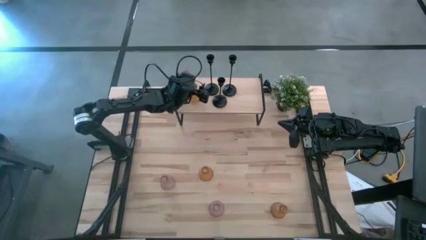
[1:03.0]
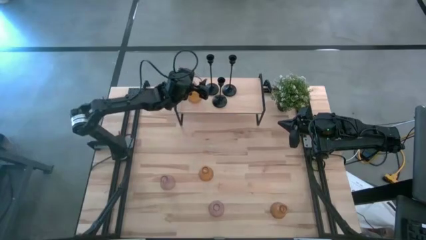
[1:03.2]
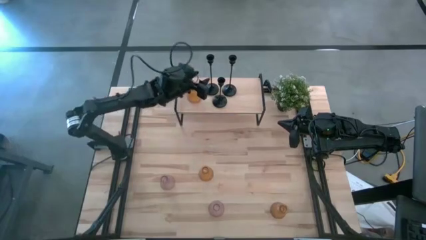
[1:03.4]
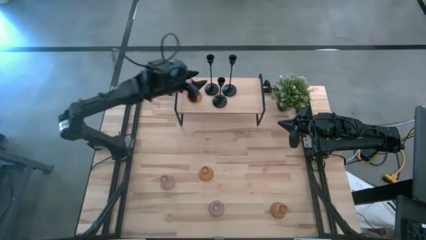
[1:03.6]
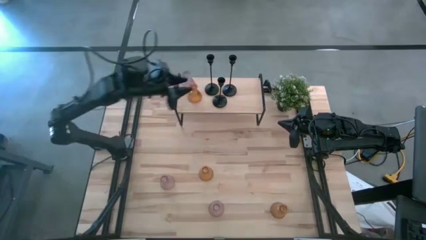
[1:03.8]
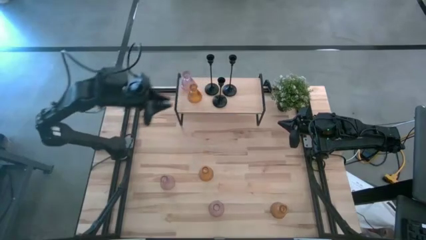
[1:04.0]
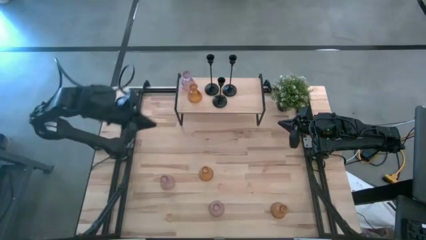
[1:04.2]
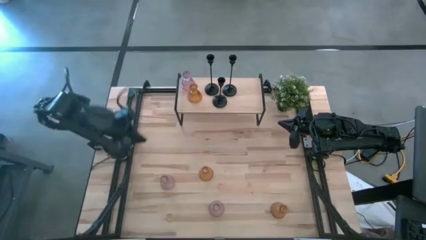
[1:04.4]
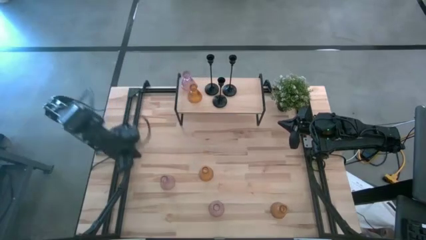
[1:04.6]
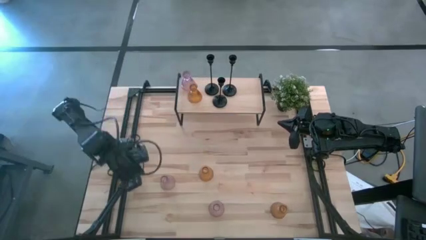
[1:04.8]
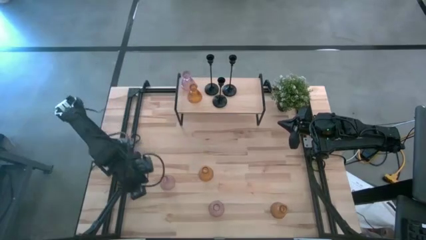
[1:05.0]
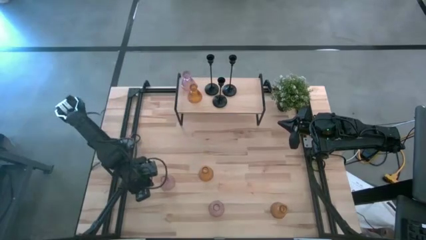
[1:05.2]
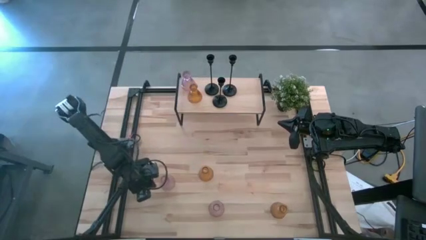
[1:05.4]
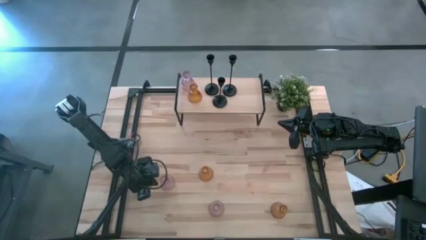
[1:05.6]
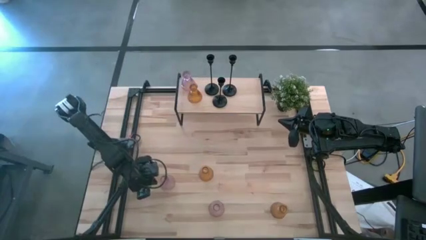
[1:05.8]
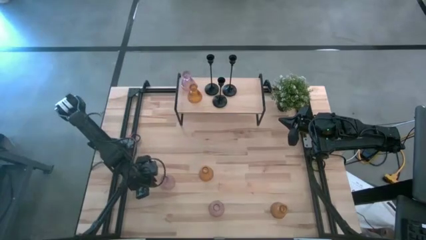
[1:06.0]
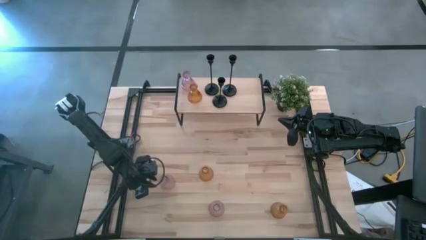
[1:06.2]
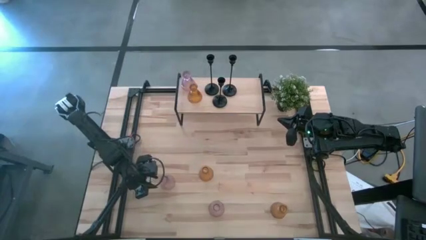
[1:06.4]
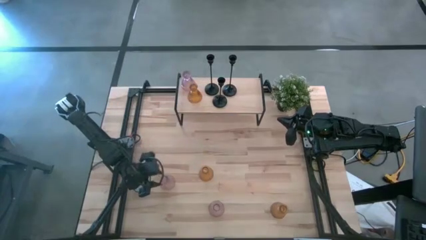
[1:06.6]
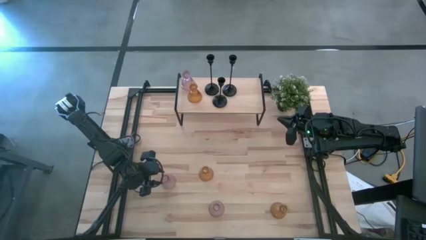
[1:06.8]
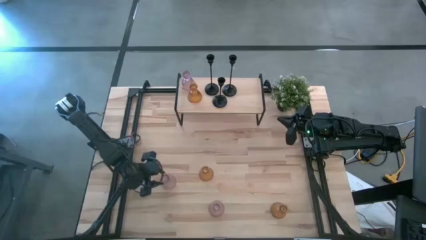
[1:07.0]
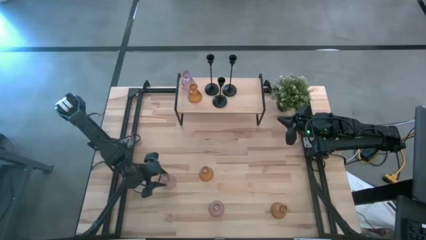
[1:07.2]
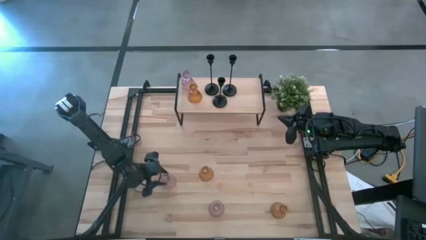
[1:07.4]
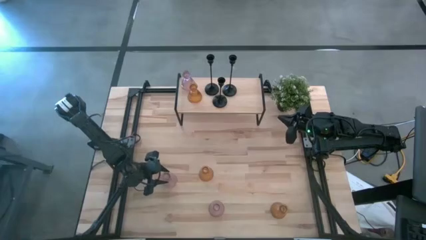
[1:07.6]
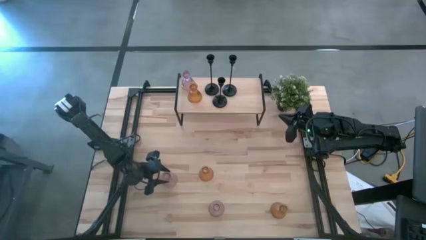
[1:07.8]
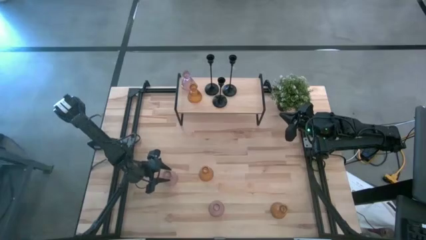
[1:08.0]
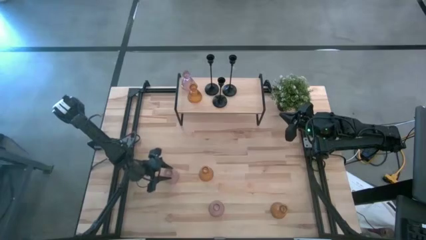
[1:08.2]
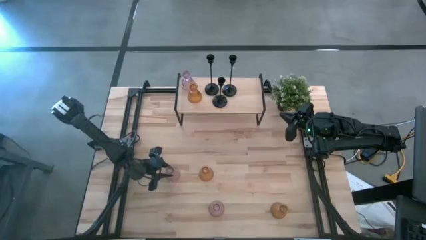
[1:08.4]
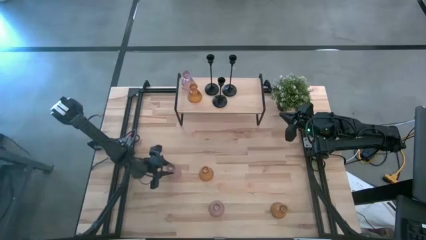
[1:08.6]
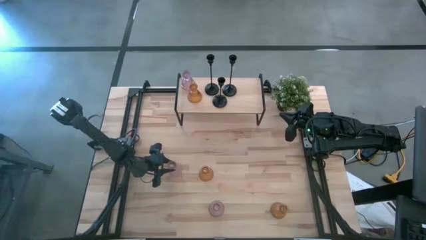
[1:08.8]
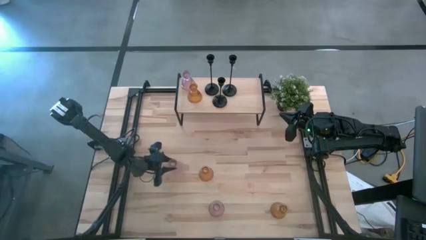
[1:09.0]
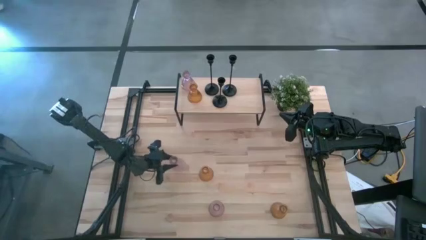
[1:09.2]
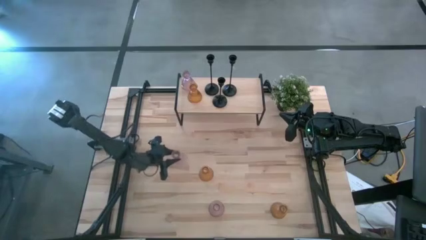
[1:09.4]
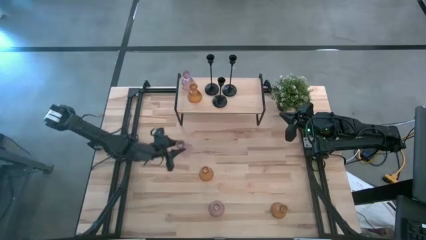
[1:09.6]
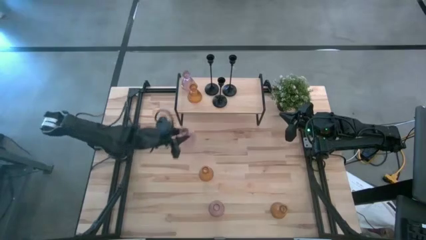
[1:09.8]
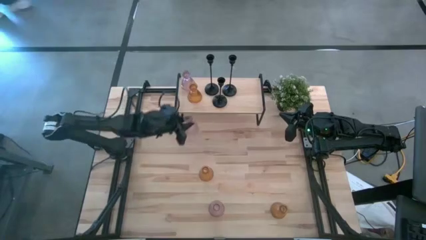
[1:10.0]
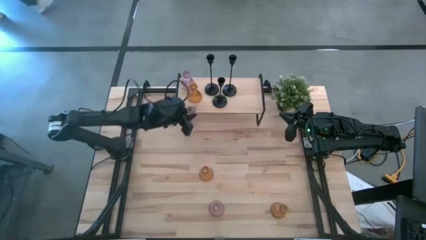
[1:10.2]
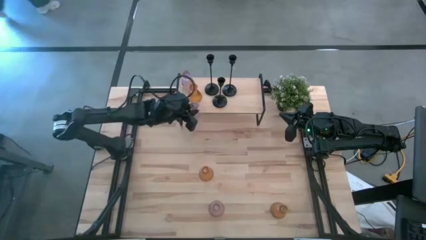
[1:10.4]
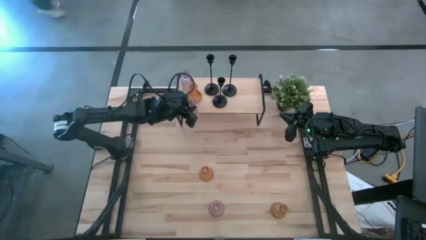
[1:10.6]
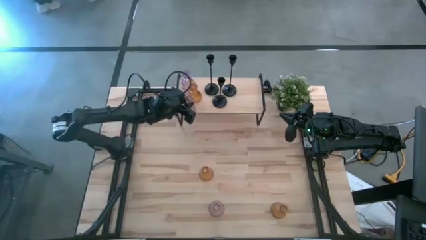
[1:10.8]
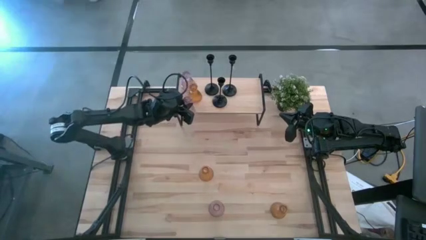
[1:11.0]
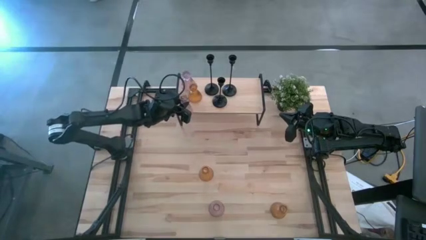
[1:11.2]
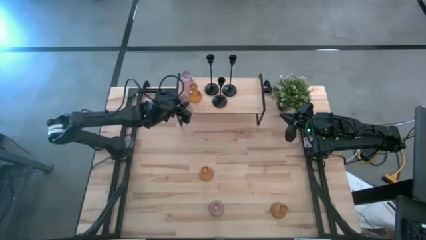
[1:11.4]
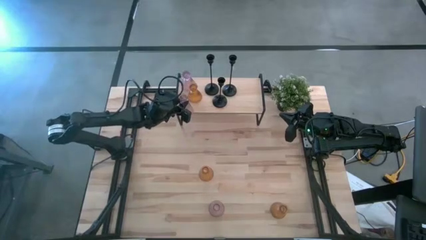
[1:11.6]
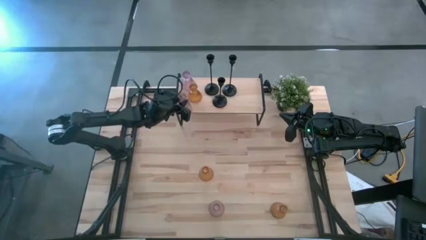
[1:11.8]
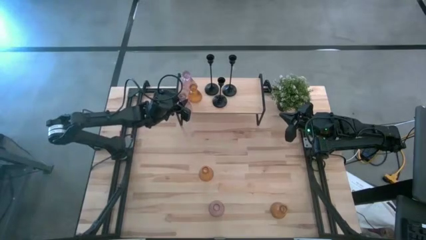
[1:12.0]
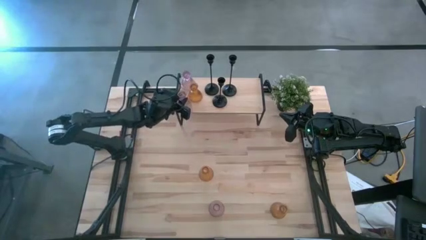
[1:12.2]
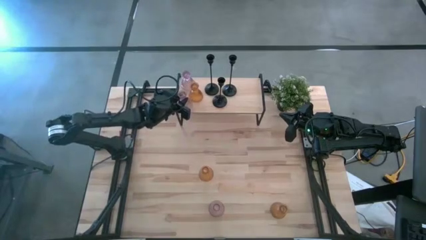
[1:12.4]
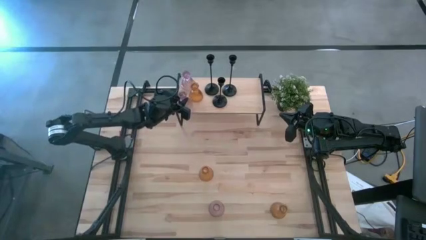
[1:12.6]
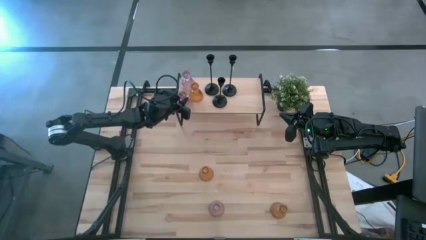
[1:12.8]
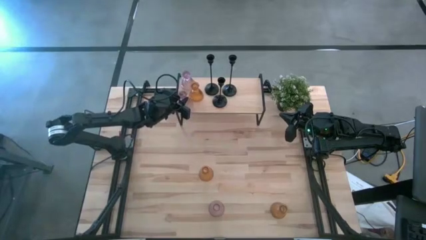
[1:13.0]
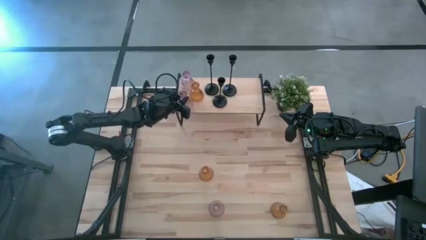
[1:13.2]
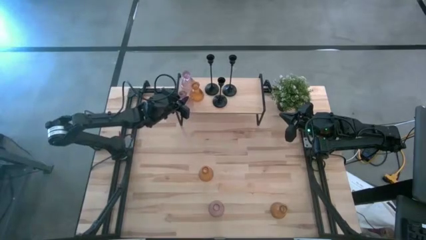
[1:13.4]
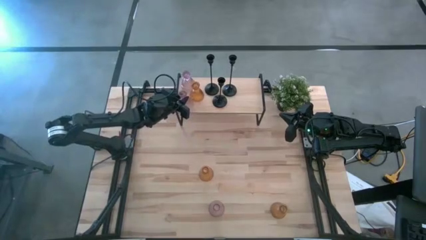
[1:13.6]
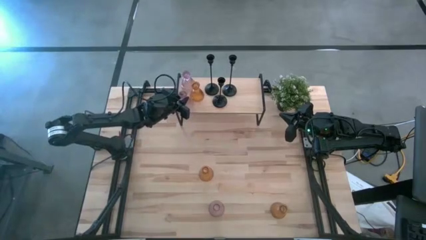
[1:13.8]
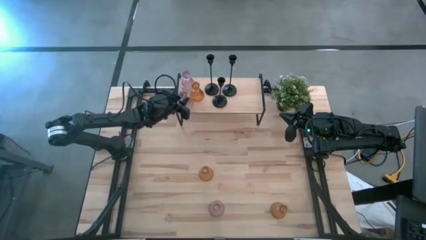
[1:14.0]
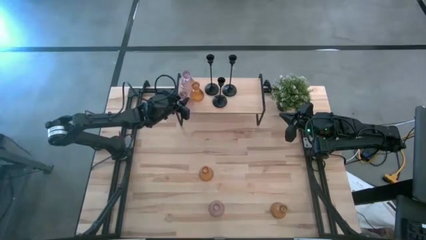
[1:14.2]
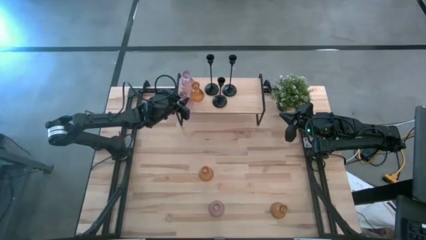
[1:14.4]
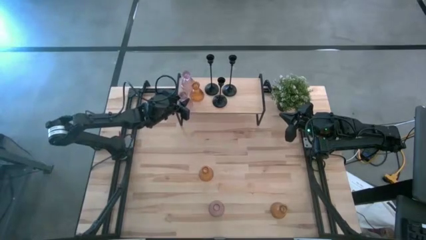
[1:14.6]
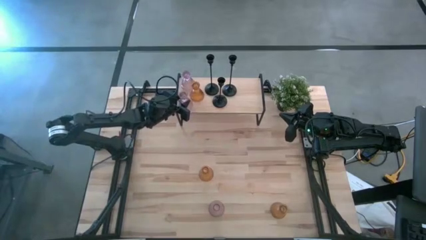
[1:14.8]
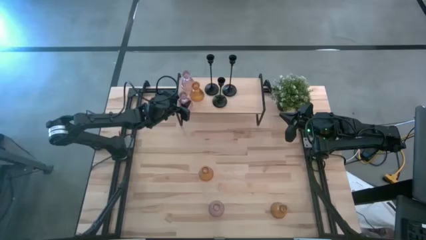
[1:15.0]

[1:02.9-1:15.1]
Task: Pick & Place candle stick holders
Put the top pink glass candle holder on the shelf
